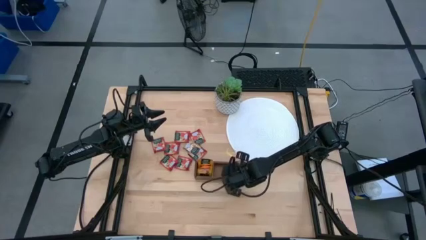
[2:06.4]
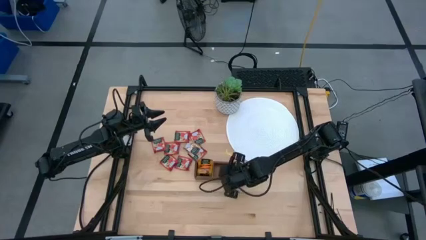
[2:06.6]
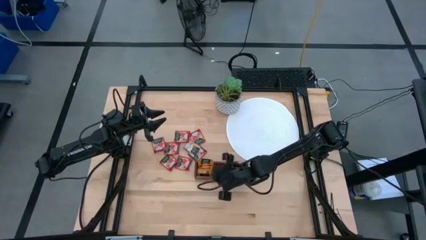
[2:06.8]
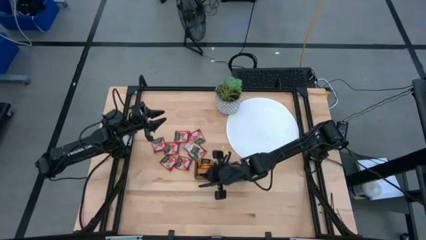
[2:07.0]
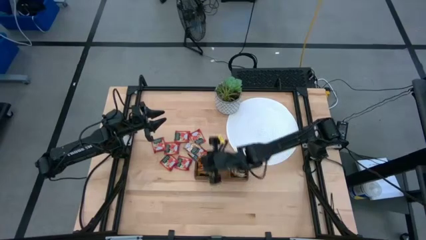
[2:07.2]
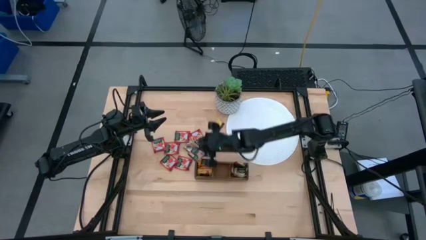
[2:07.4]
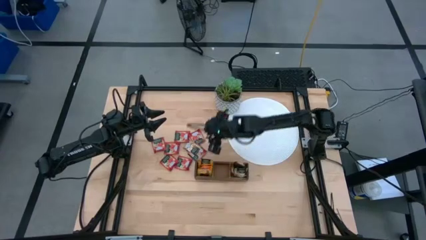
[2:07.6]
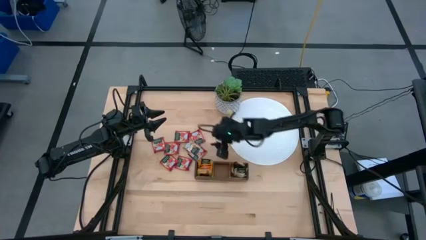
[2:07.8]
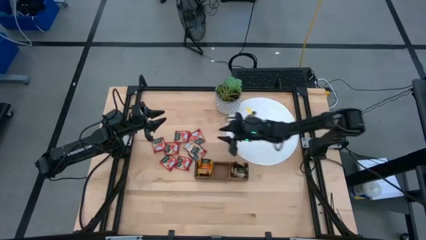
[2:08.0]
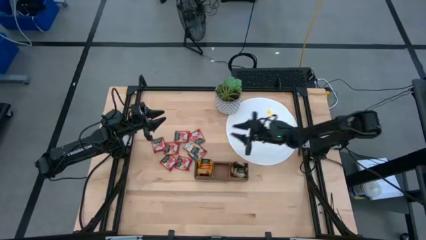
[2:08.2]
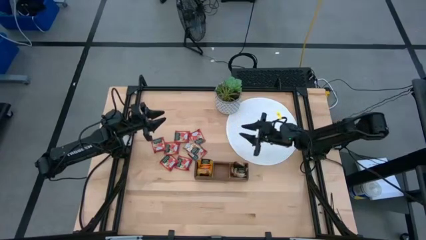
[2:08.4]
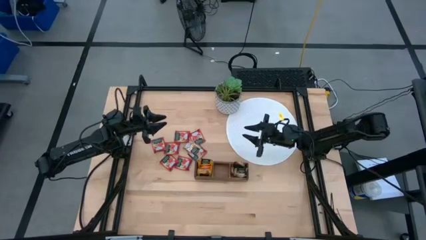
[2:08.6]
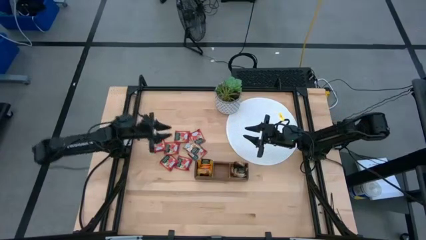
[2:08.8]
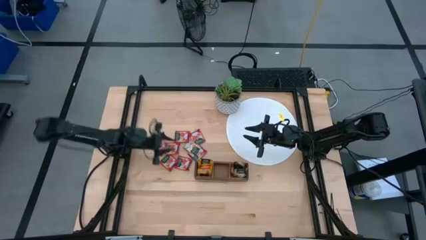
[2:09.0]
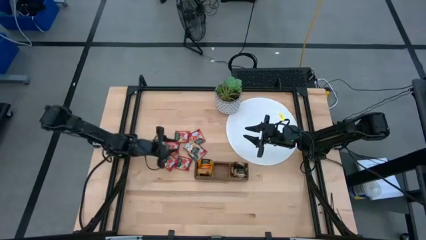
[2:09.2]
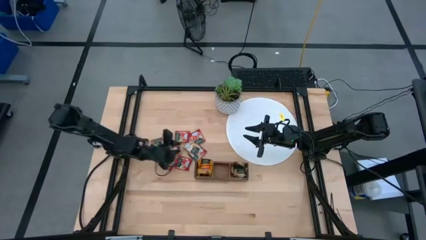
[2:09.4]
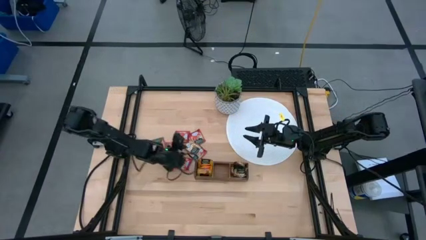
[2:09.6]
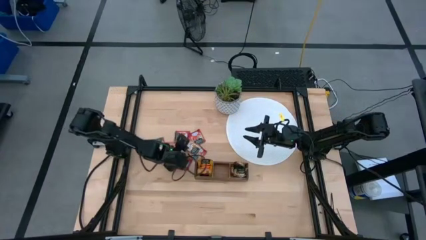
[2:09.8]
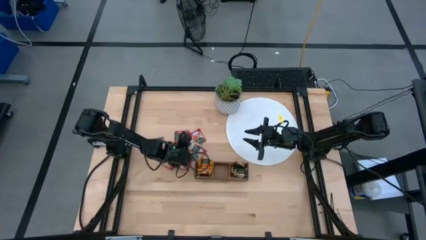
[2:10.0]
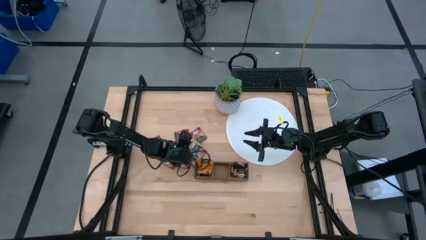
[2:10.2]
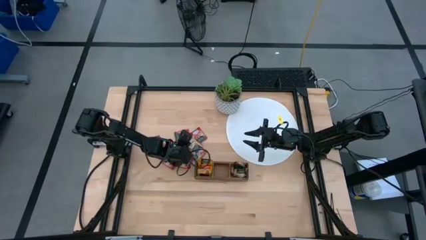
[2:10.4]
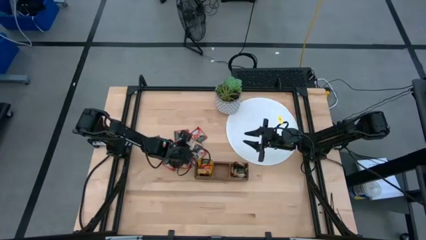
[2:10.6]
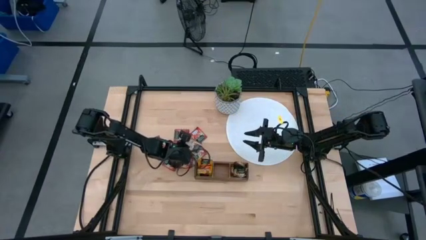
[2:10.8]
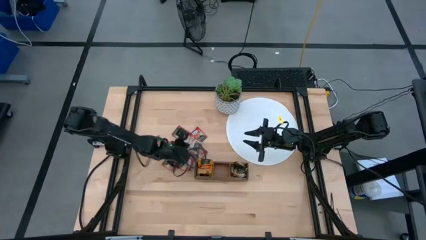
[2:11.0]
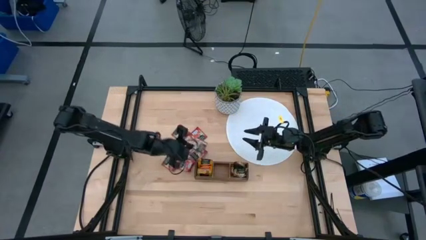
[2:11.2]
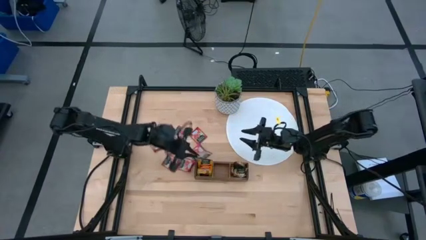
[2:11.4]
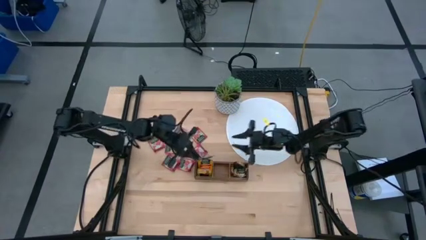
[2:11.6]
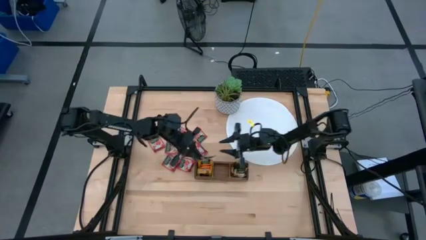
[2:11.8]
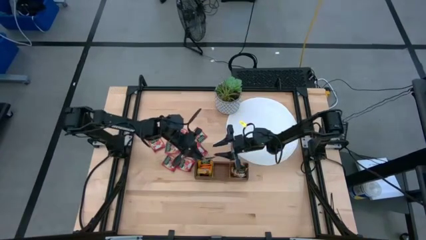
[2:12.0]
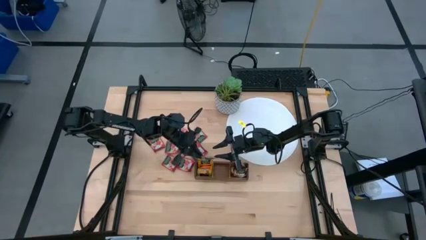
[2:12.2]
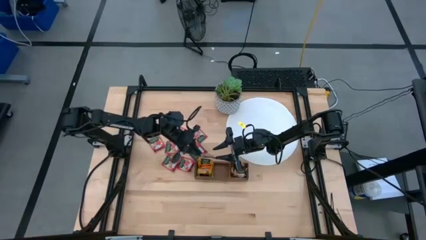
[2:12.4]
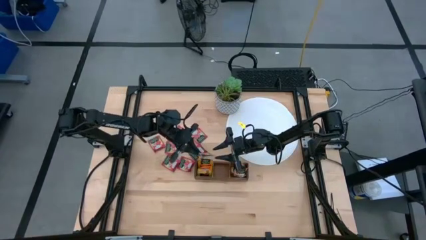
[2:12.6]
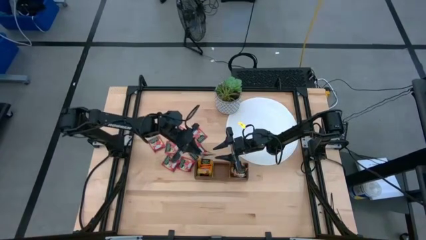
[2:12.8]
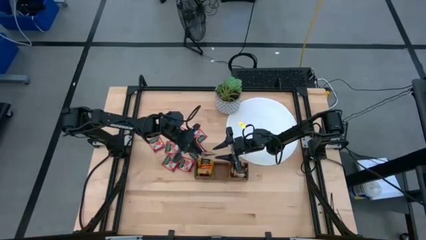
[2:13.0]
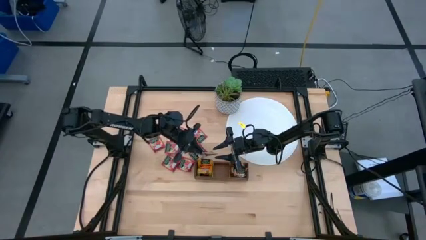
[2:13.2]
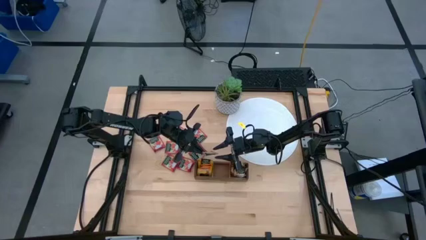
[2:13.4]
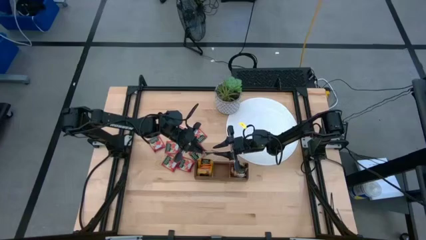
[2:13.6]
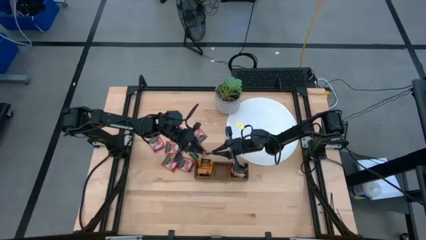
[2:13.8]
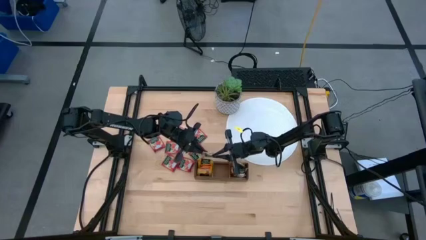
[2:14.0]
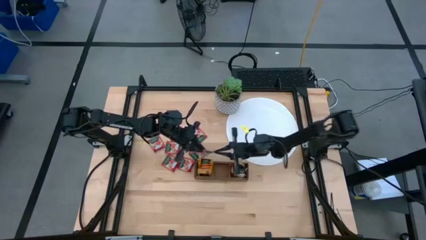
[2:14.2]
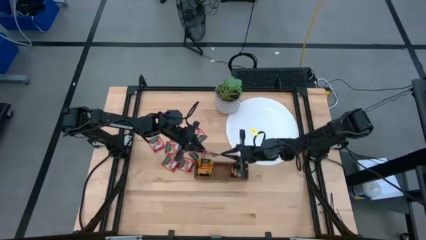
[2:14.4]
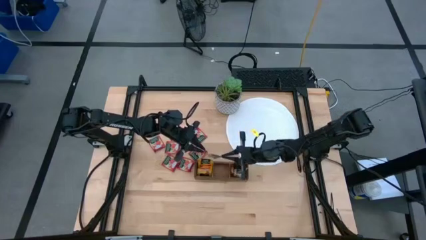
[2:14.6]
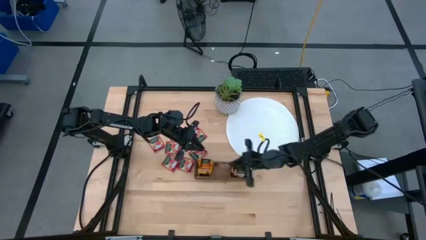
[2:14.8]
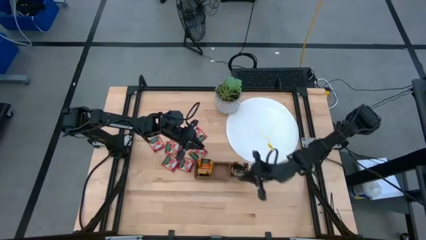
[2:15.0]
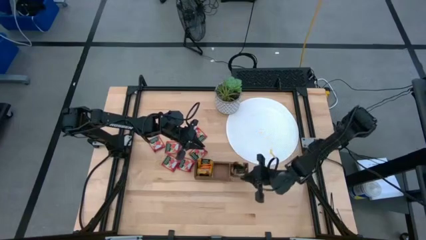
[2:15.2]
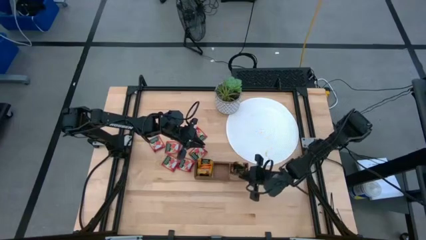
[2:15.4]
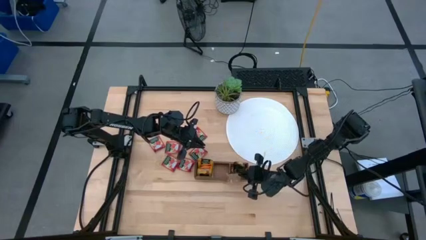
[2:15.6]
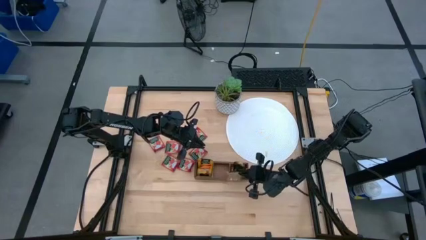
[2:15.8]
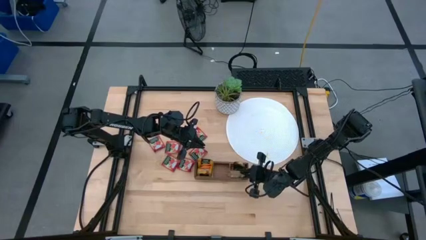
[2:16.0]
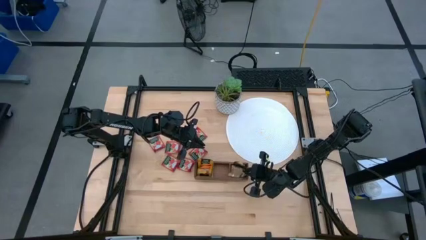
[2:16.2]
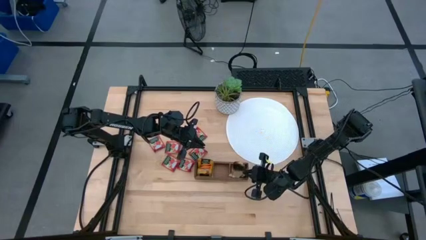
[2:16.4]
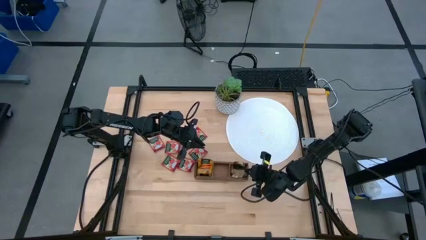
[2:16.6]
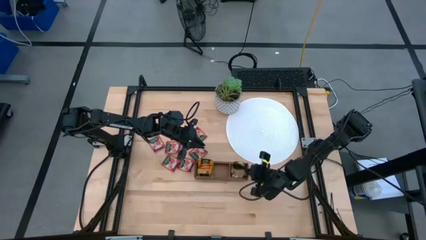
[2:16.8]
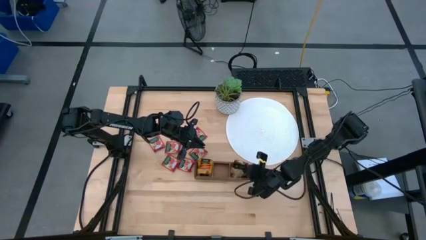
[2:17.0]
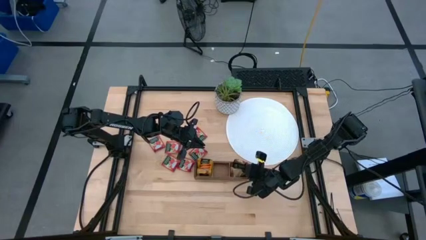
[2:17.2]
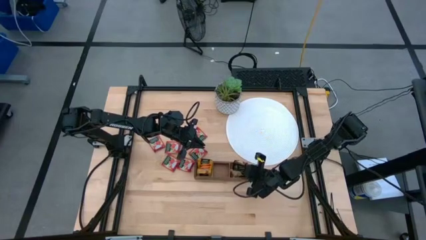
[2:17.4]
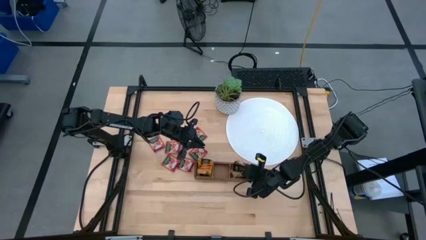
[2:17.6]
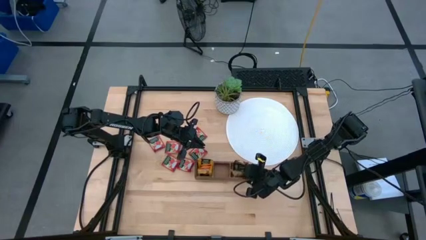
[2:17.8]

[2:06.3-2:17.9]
Task: Pick & Place Tea
Put the light brown tea bag into the right section of the wooden organizer

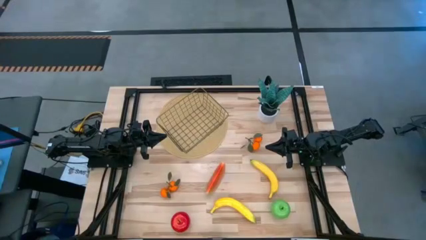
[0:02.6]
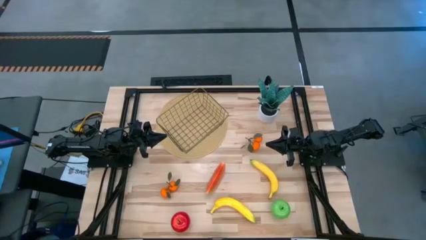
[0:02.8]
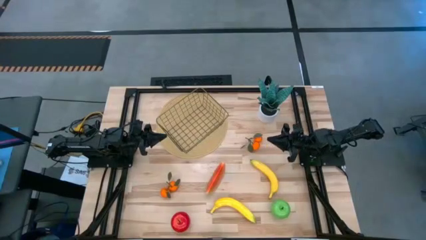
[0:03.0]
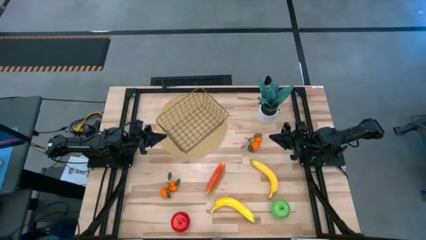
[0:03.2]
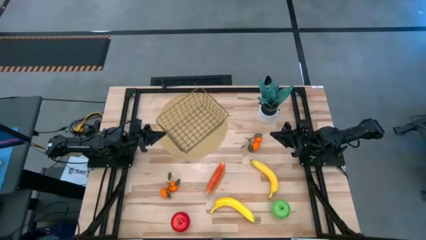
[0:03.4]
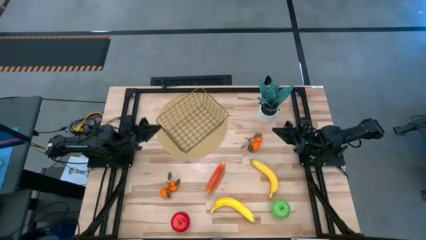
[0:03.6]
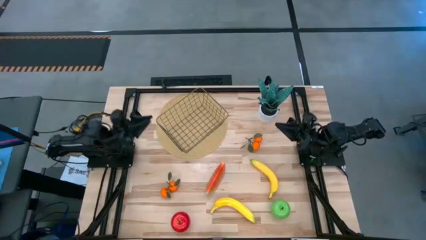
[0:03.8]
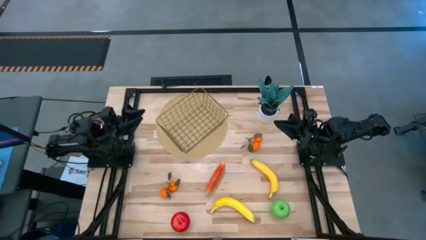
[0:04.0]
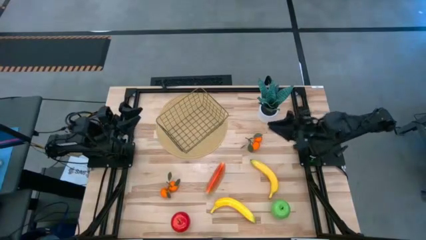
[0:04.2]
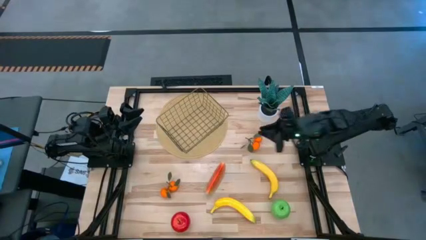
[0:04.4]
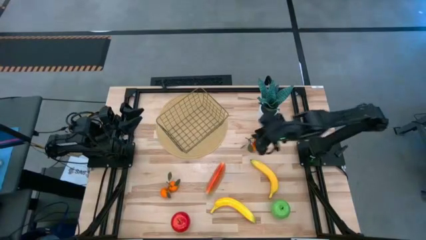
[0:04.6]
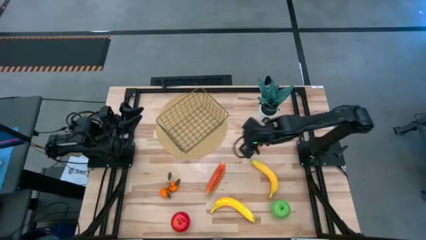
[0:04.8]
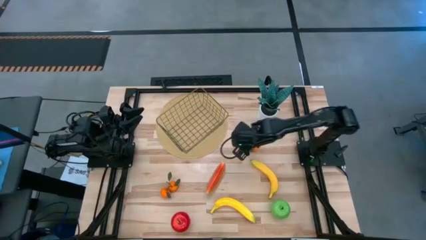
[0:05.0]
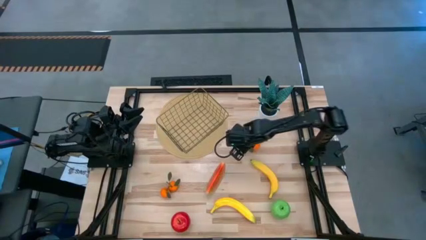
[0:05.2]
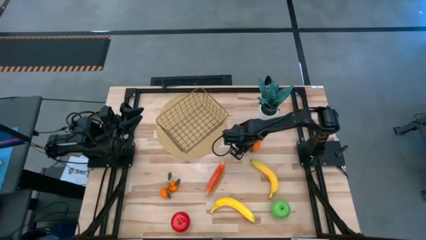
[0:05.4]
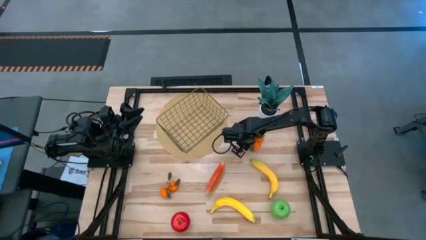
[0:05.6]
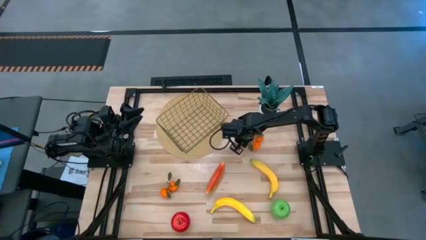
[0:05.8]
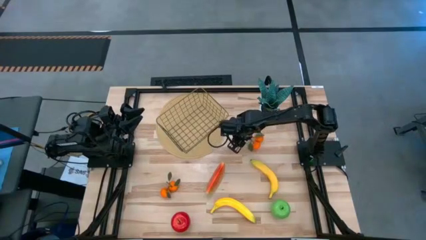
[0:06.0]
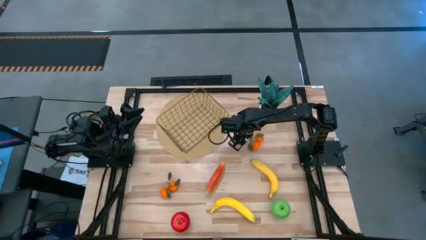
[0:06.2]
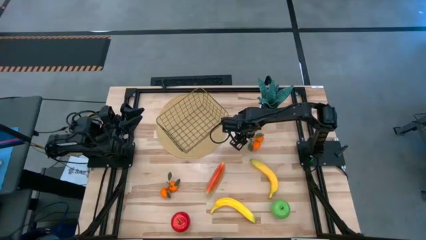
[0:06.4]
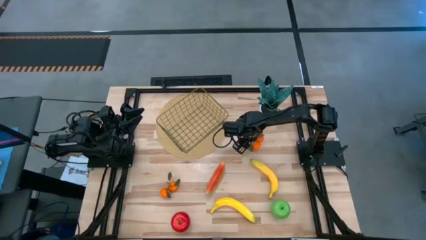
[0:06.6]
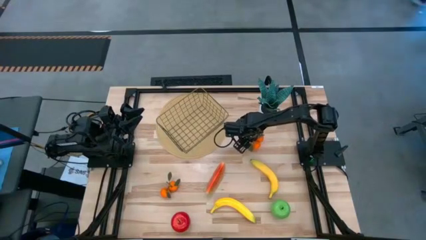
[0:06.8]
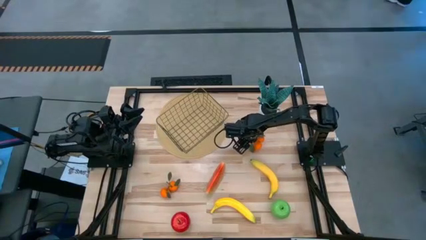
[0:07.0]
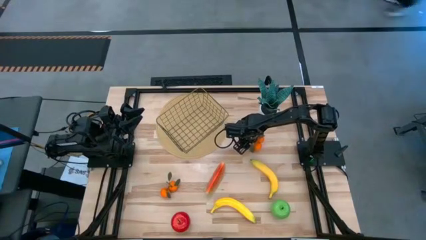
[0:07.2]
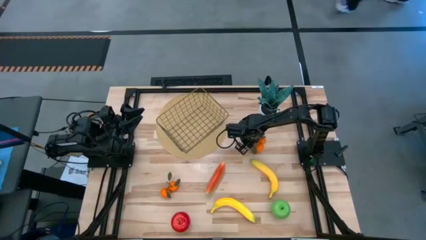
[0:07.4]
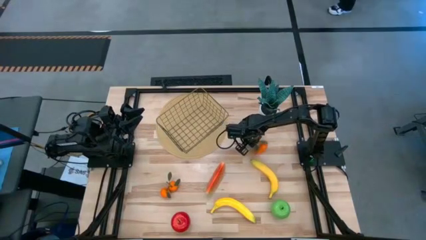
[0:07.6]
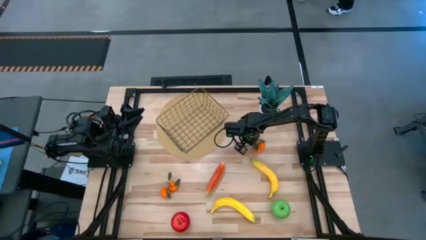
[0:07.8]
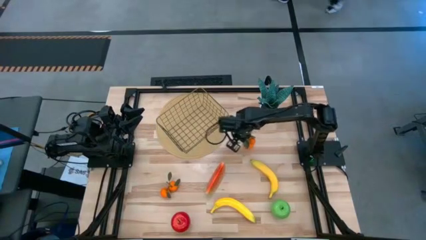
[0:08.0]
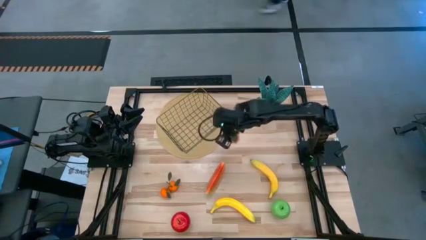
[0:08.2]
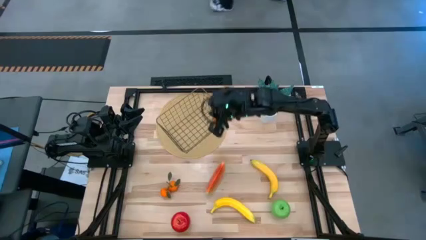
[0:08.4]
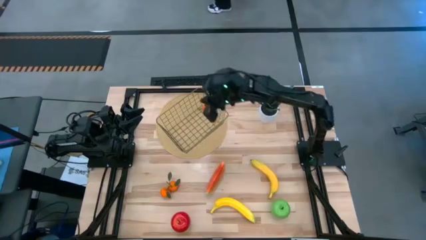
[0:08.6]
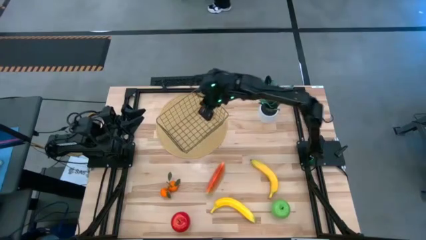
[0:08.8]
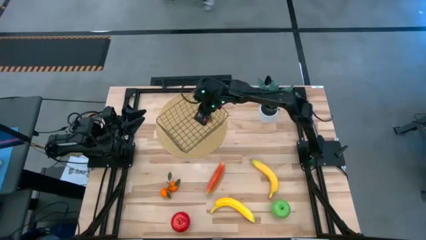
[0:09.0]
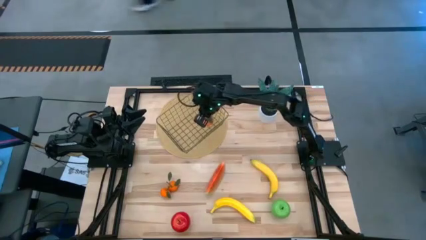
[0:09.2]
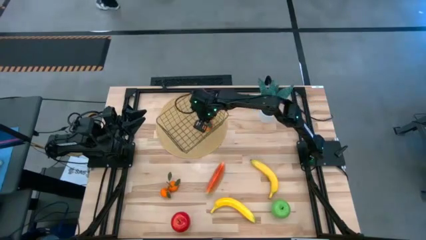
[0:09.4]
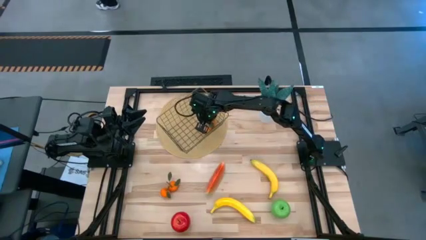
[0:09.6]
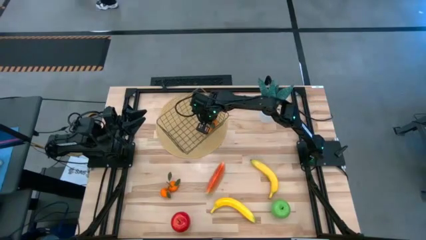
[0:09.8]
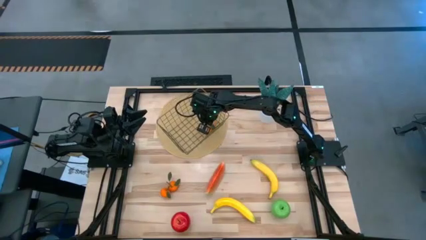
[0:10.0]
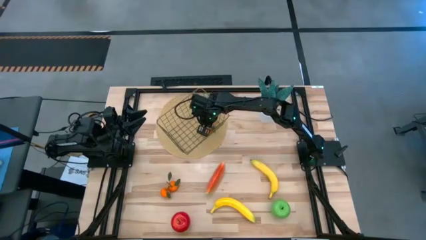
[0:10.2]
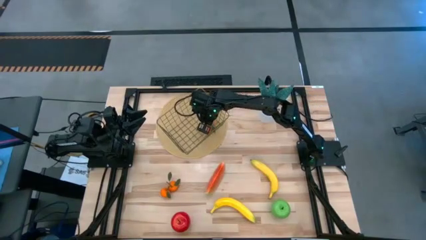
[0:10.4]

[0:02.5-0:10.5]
Task: Build produce basket
Put the right yellow tangerine into the wire basket
